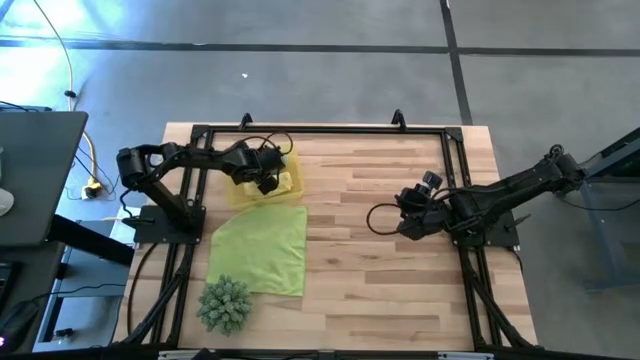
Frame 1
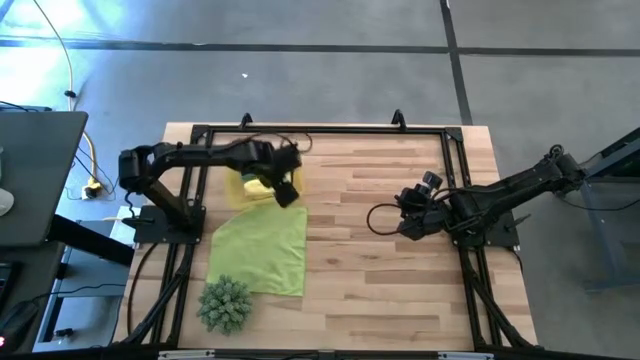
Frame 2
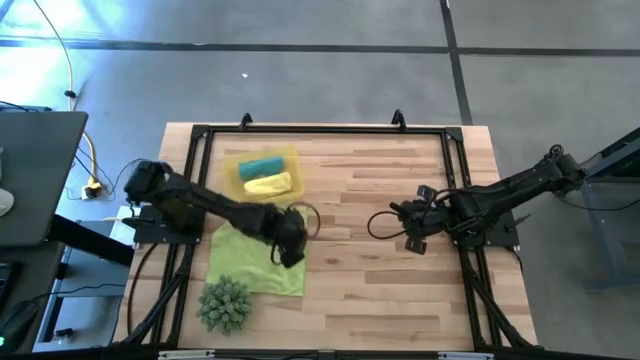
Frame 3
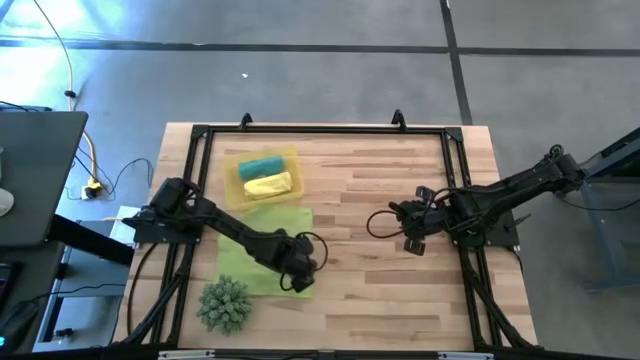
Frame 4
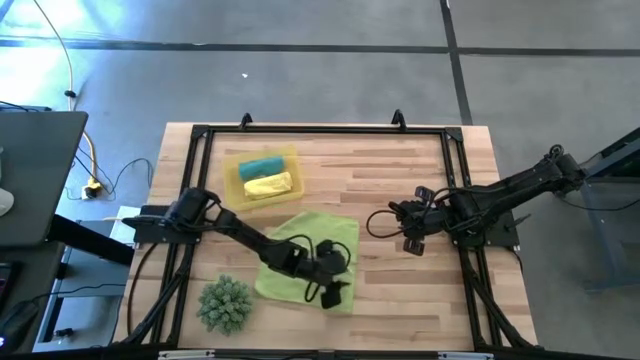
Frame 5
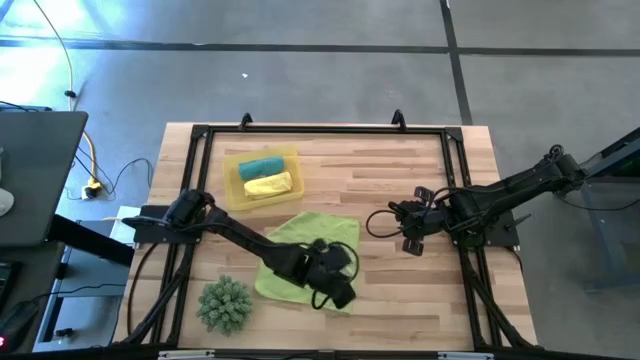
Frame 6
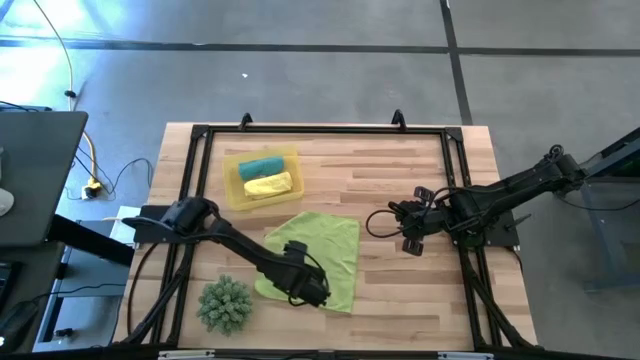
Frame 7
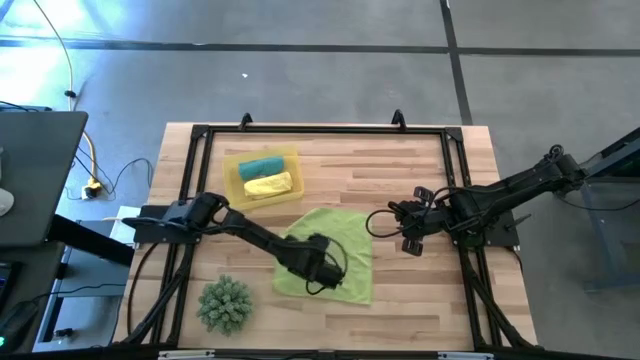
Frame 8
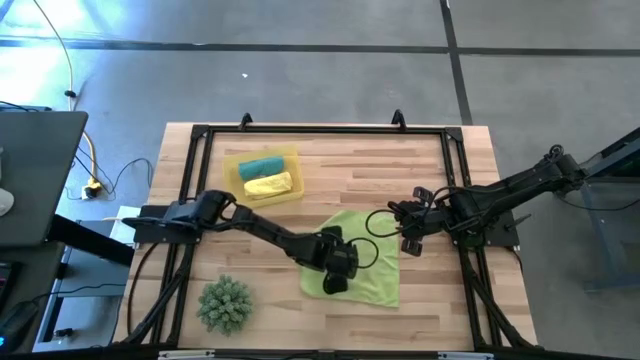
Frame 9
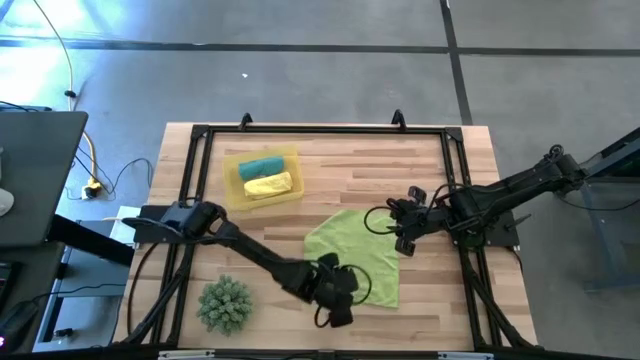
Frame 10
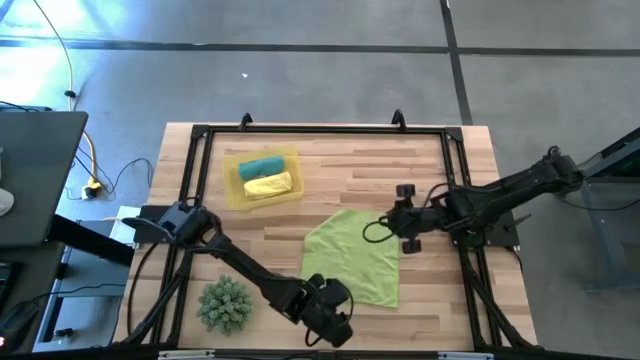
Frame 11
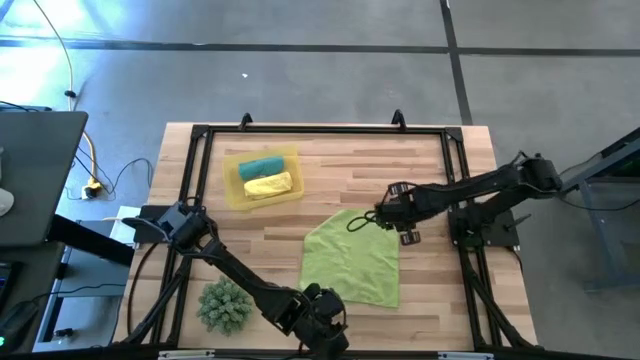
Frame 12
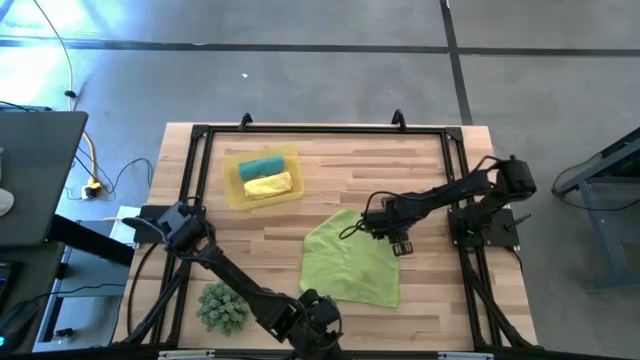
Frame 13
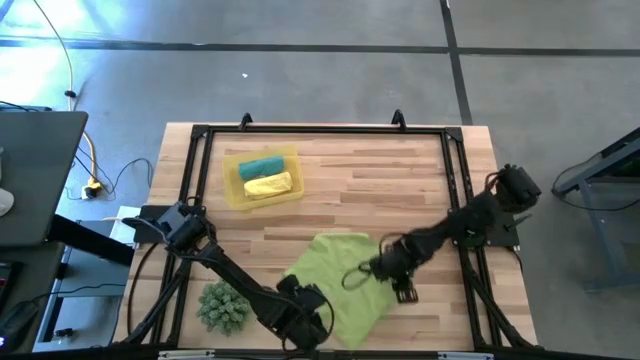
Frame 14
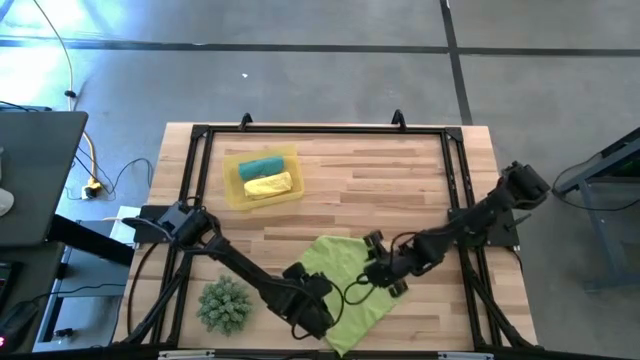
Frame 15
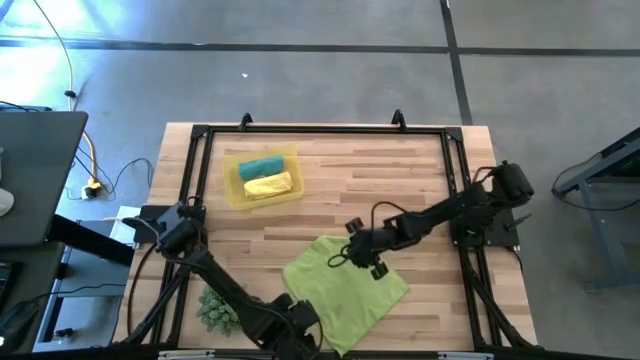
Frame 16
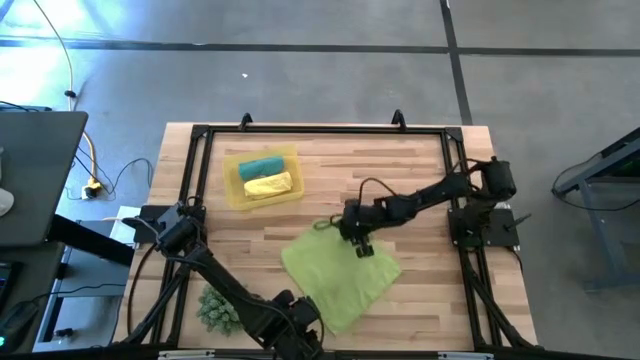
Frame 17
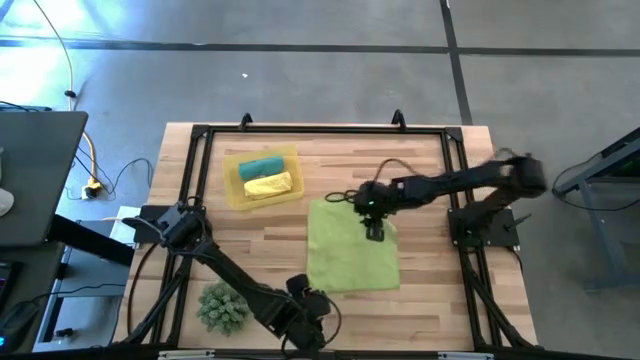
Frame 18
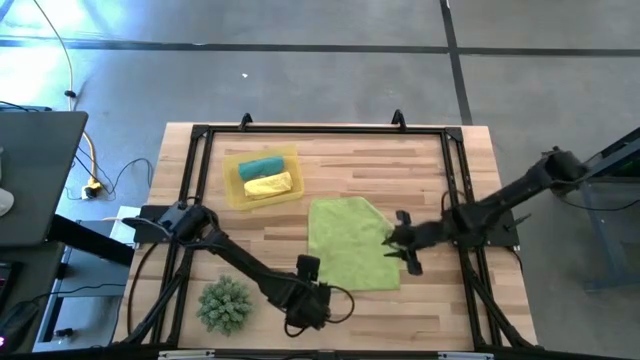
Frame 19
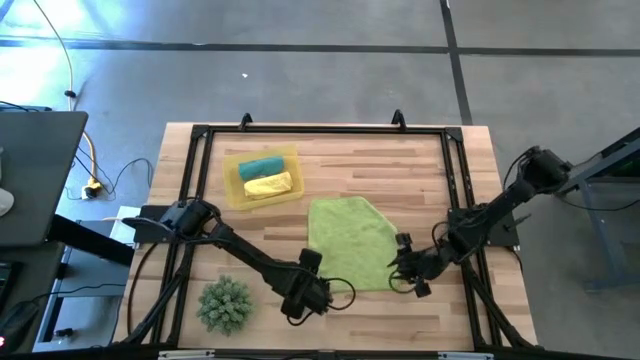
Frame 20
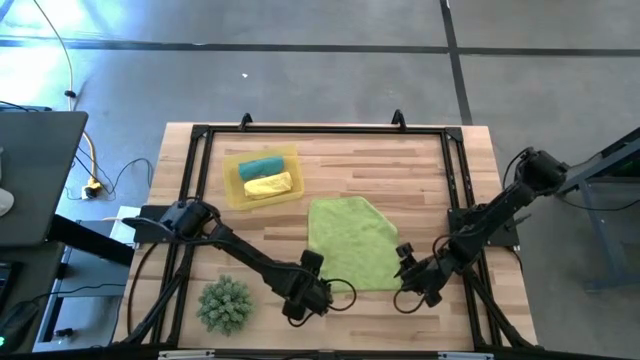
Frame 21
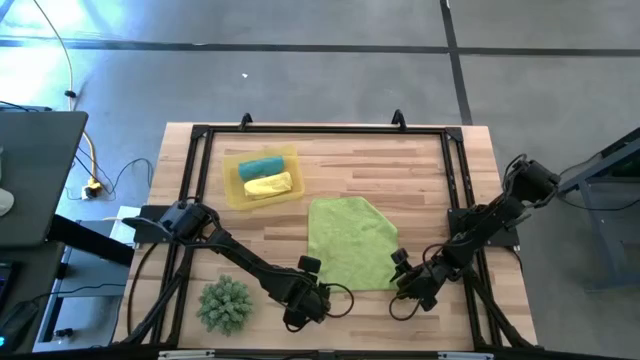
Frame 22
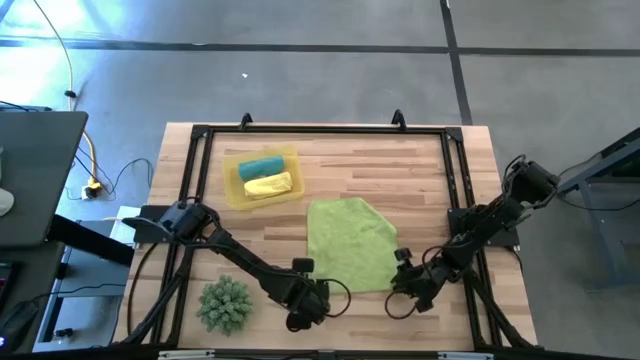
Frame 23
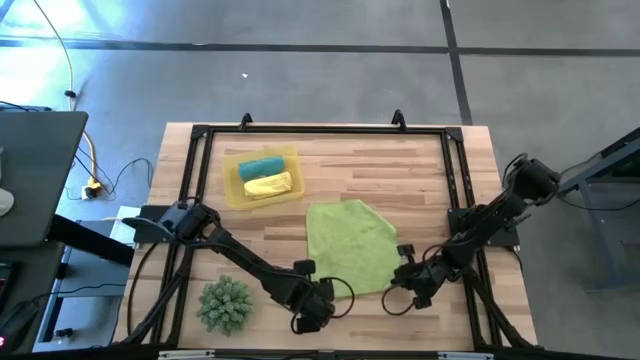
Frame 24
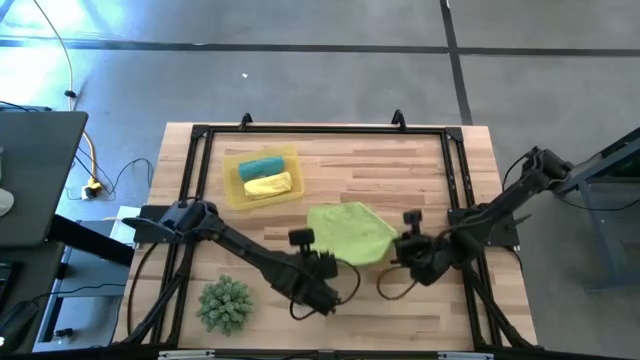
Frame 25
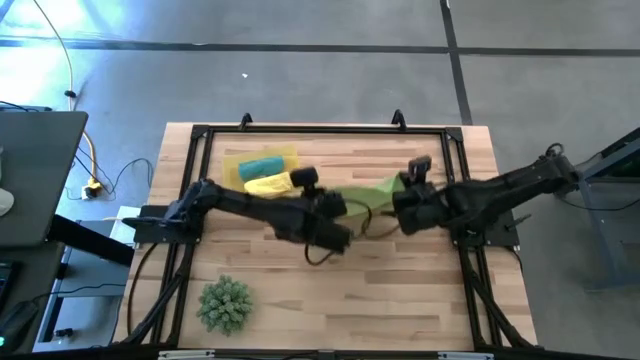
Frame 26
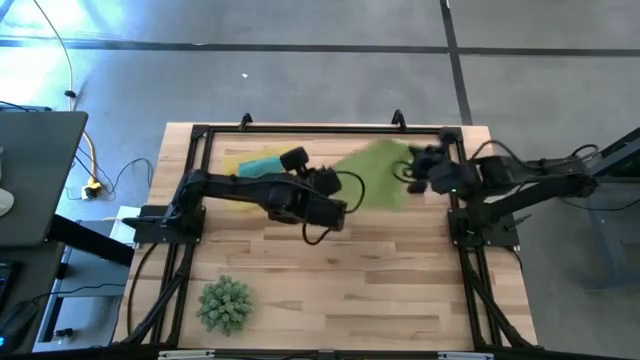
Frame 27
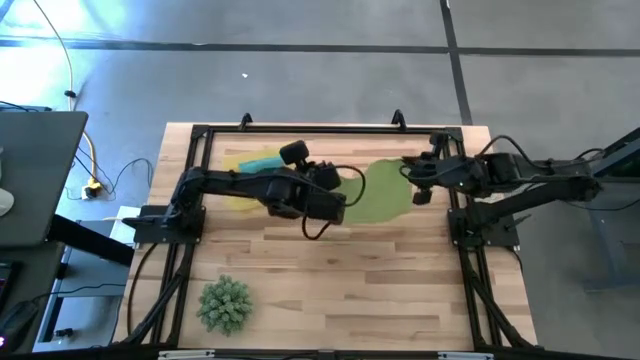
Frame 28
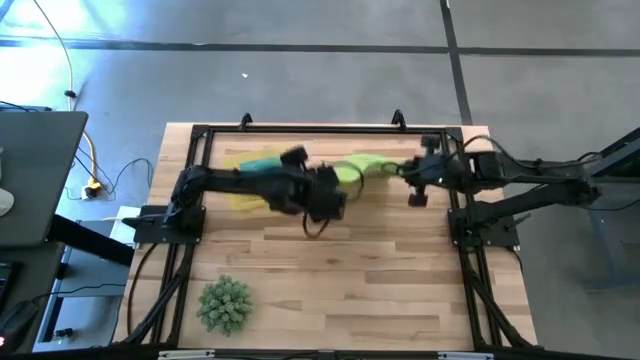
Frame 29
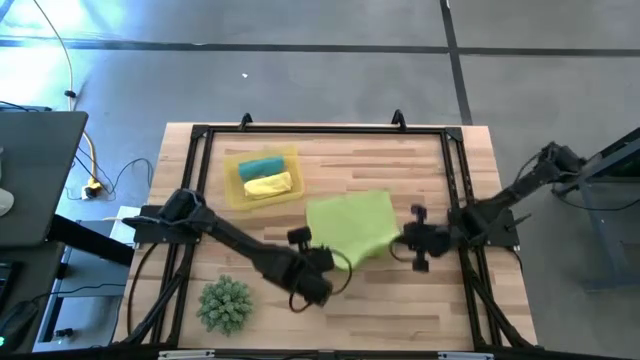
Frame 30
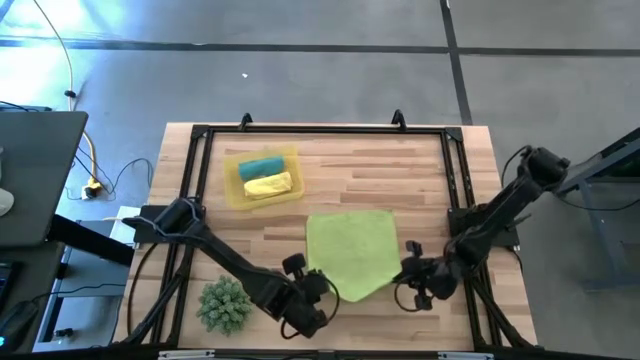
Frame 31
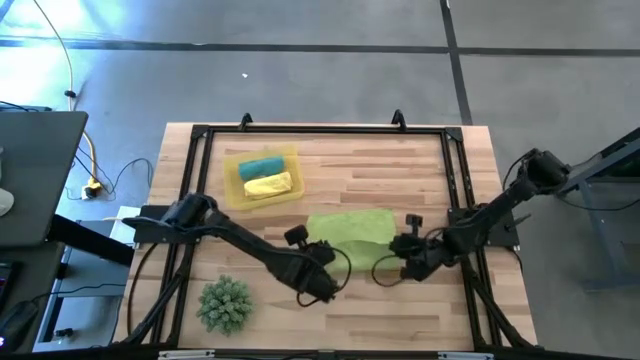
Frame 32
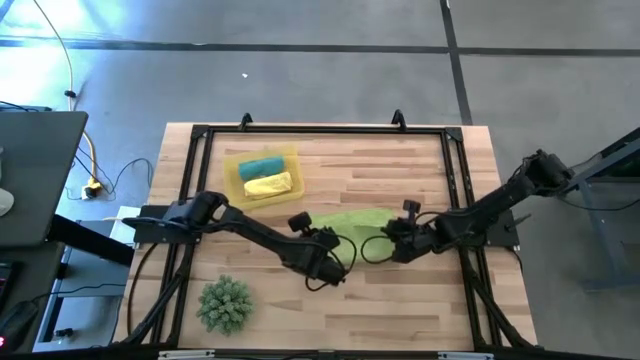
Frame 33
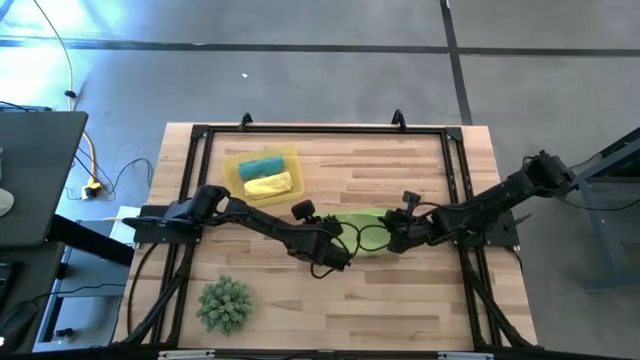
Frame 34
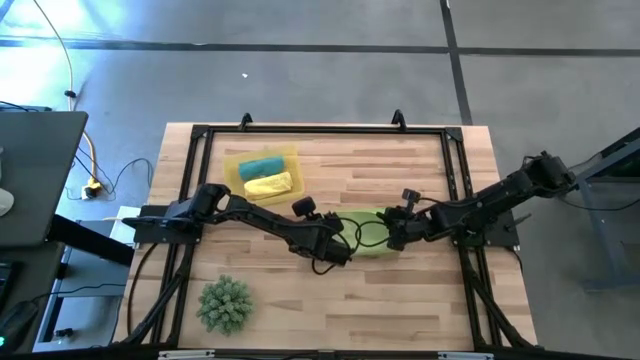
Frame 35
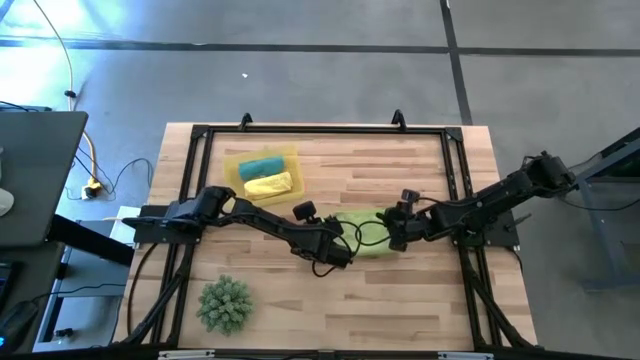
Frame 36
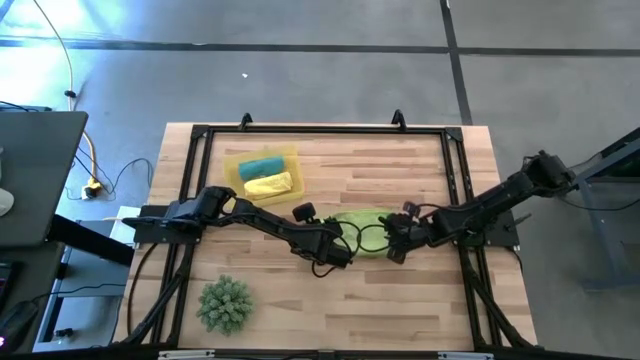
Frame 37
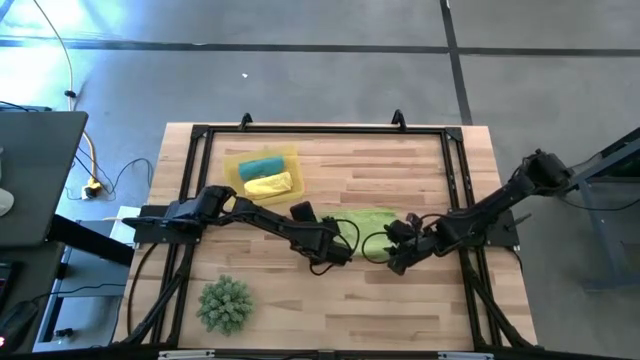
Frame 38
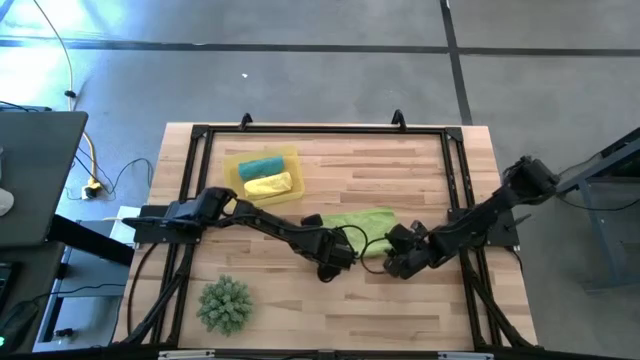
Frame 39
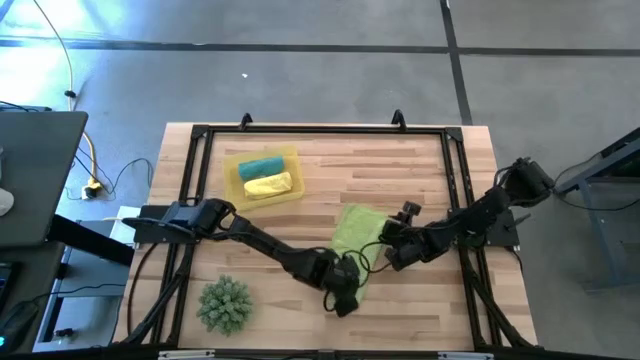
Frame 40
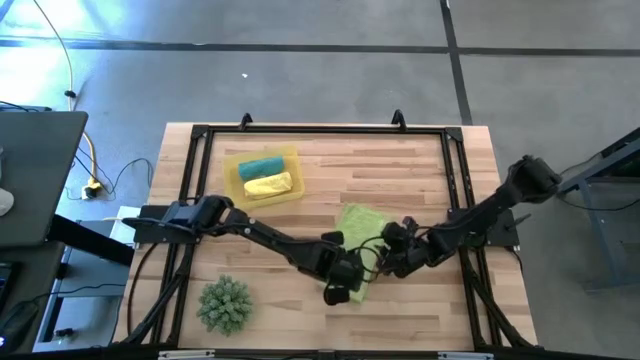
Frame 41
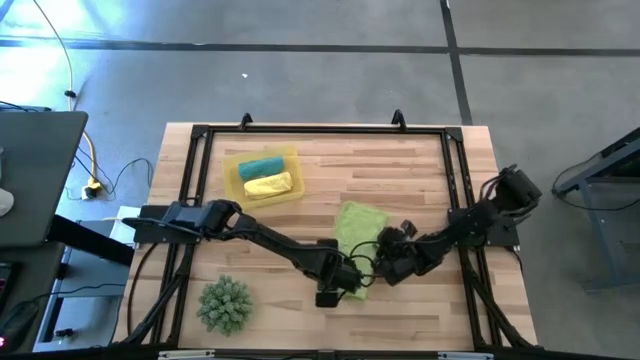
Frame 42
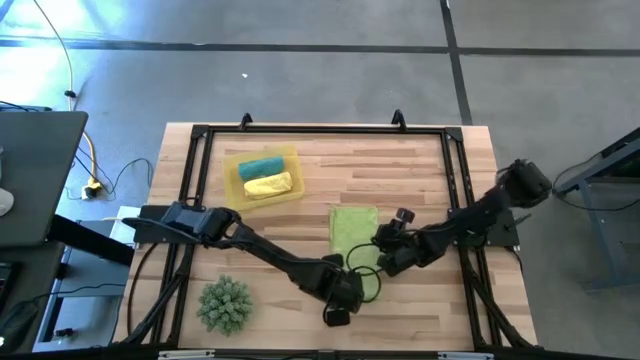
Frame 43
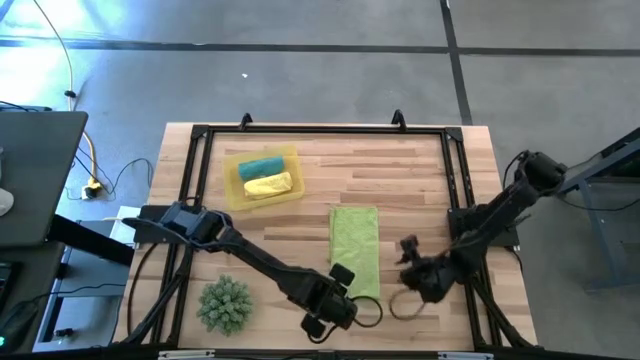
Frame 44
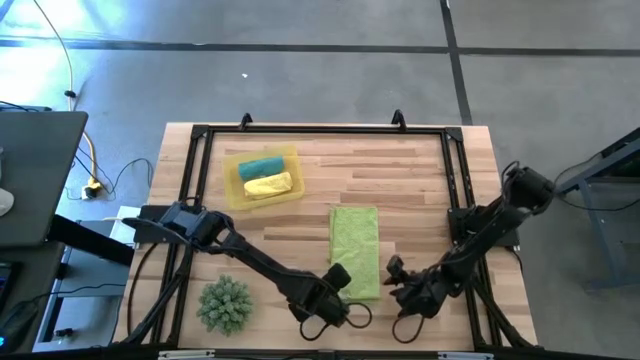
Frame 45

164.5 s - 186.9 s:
Task: Roll microfiber towels into tight, uniform cylinder then place into a basket
Roll the green microfiber towel
